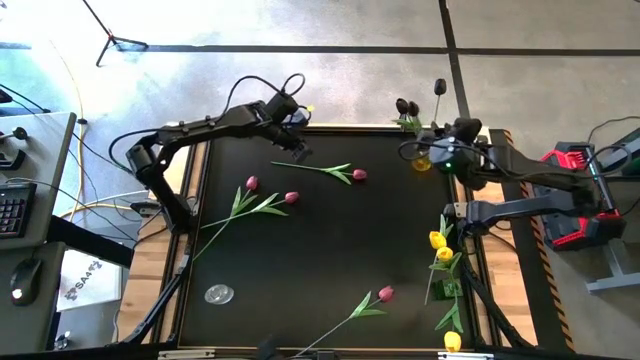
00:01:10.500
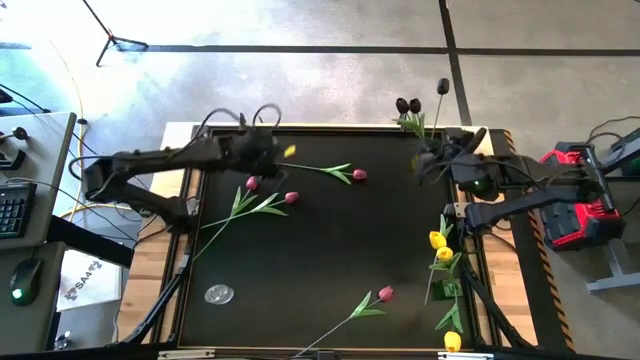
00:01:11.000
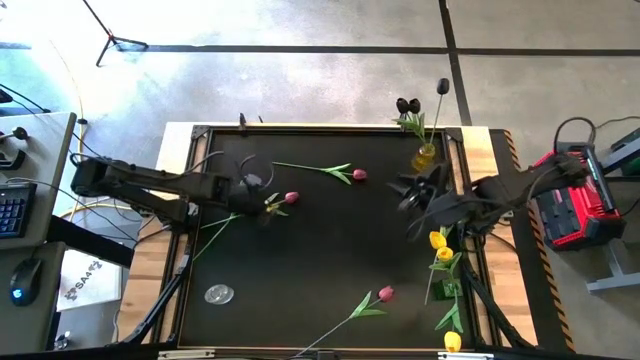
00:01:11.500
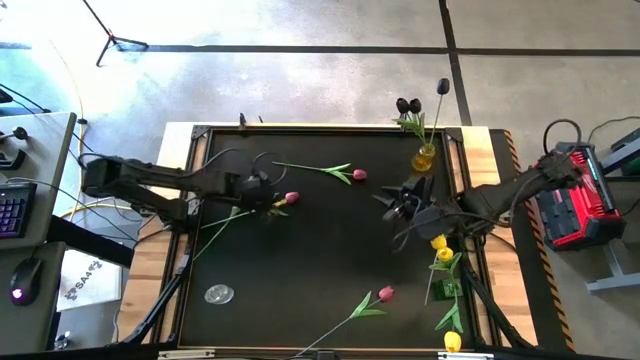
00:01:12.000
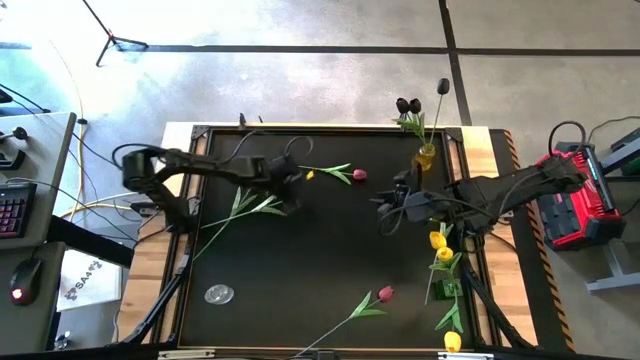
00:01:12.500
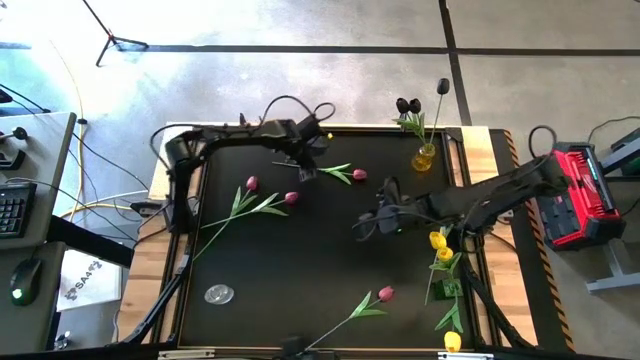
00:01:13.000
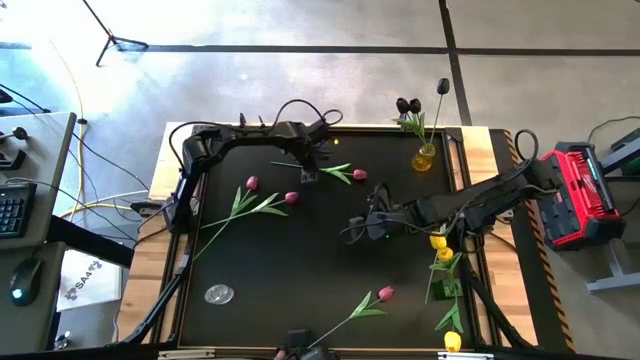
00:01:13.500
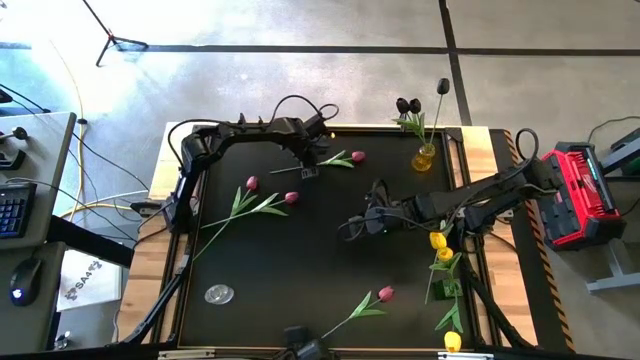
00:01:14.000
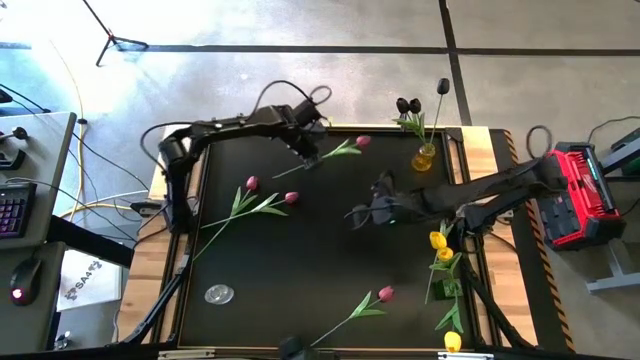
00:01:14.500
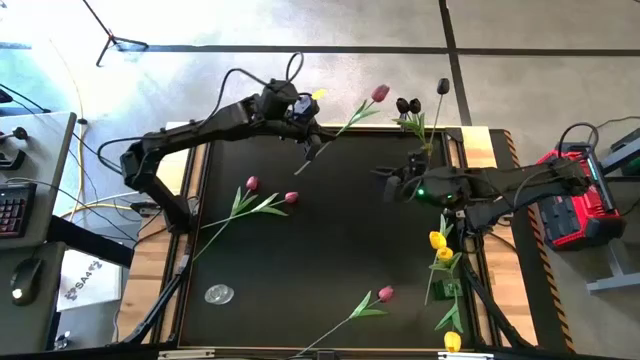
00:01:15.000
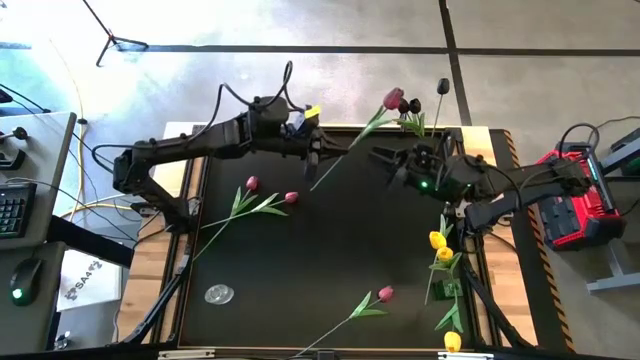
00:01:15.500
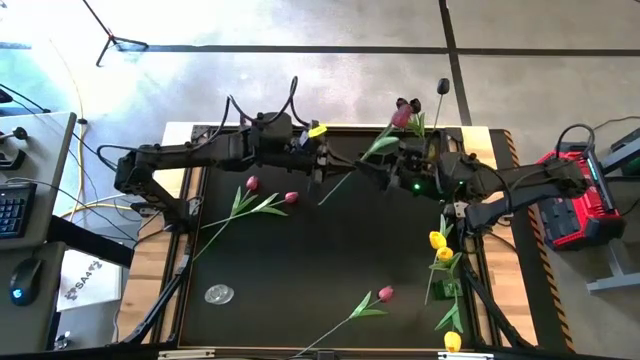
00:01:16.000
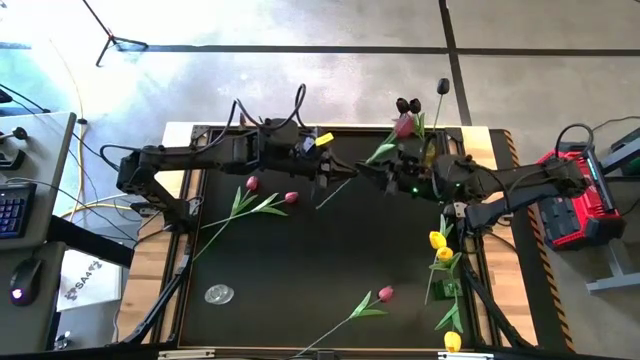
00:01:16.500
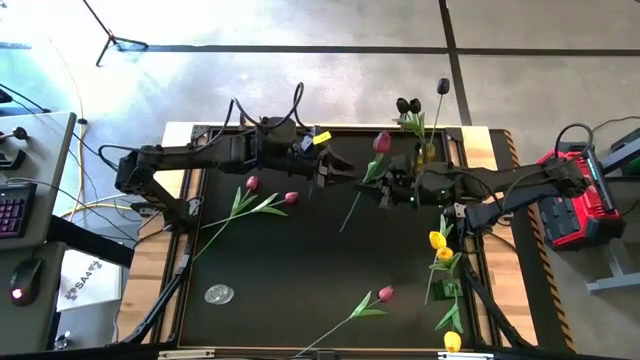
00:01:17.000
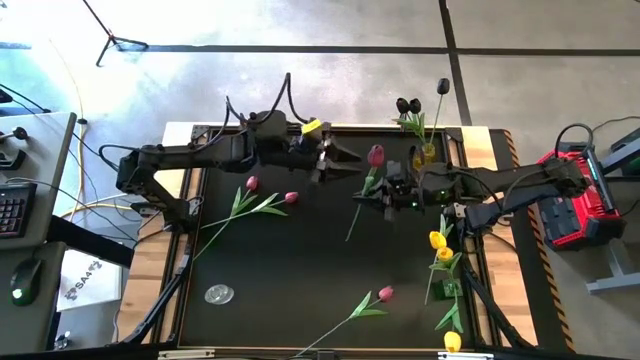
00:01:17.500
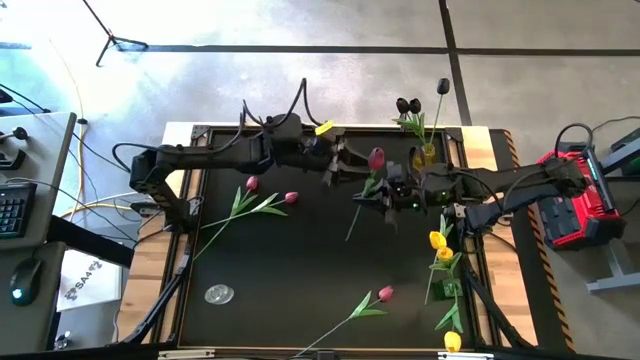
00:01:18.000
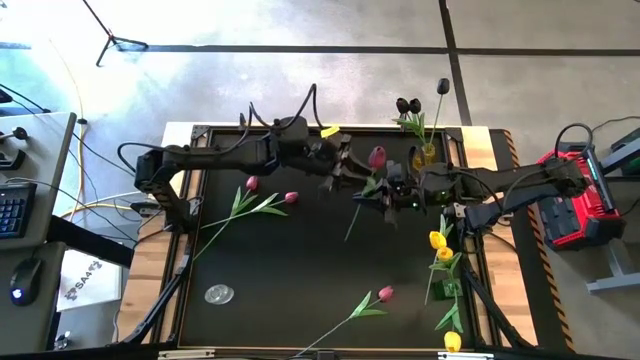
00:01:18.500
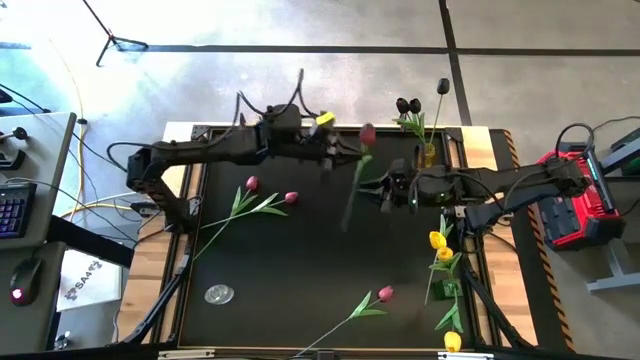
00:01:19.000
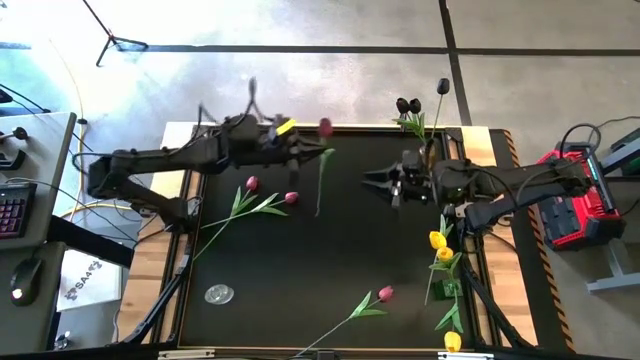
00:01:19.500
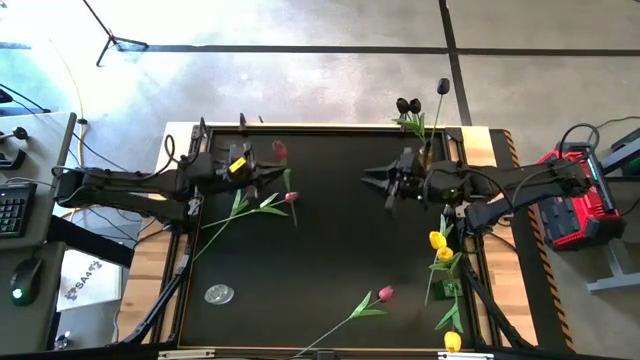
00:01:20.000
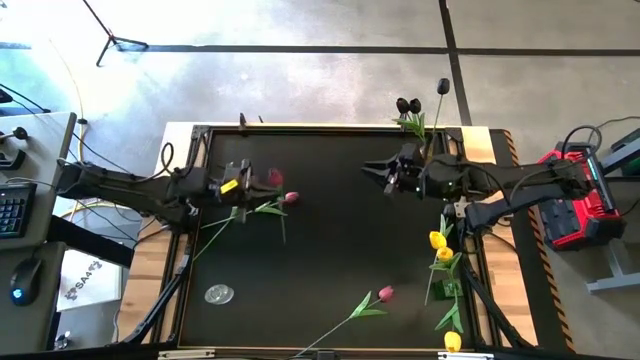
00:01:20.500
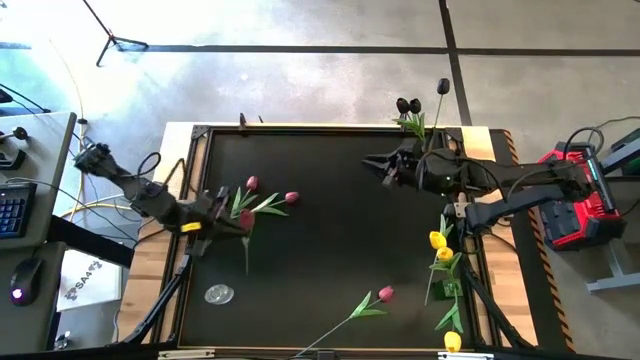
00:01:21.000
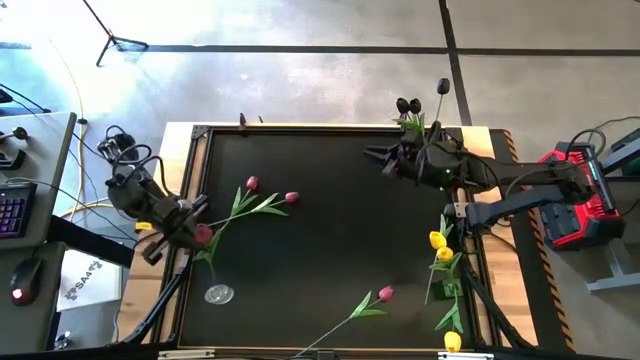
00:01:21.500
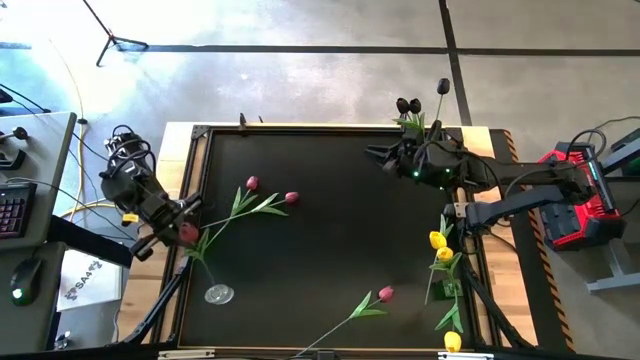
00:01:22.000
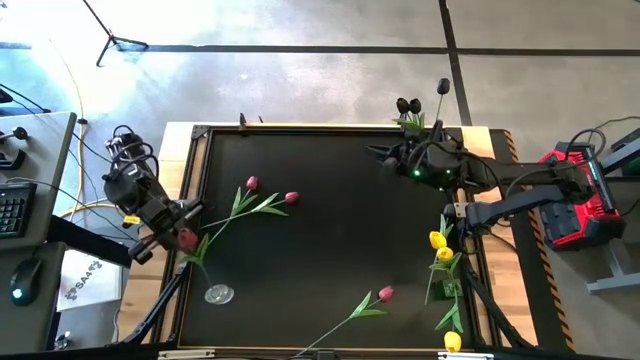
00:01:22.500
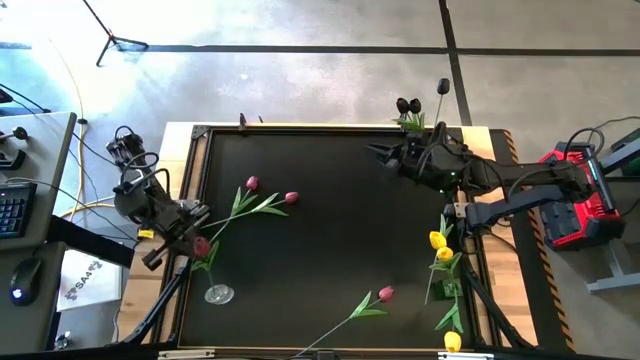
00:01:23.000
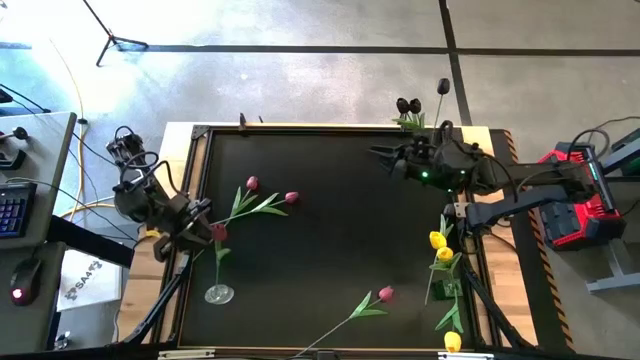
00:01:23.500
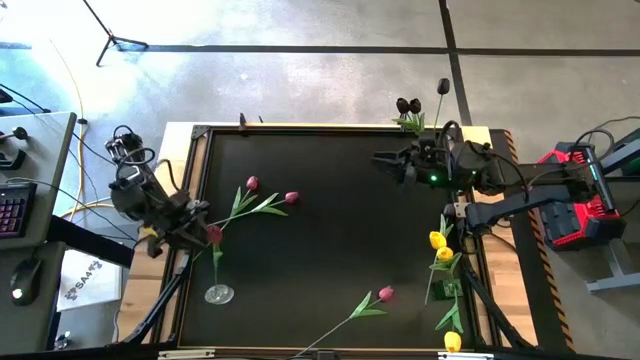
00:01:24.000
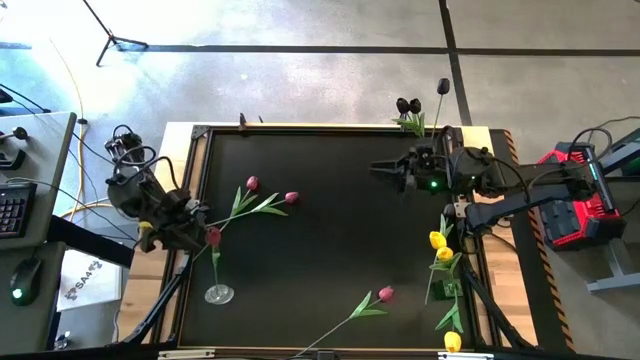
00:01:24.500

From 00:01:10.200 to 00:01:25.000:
Task: Sort flowers into vase by color
Put the top center red flower into the transparent vase

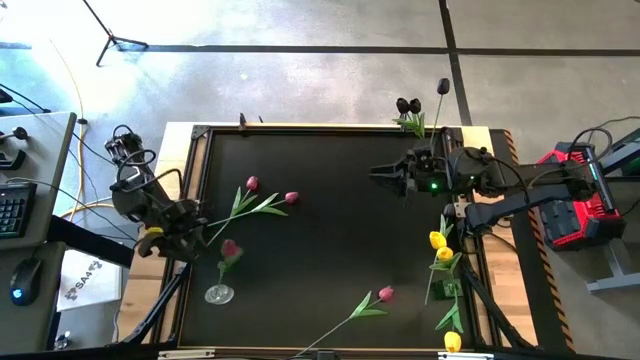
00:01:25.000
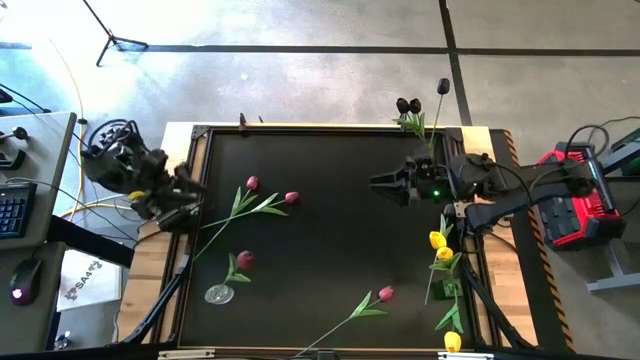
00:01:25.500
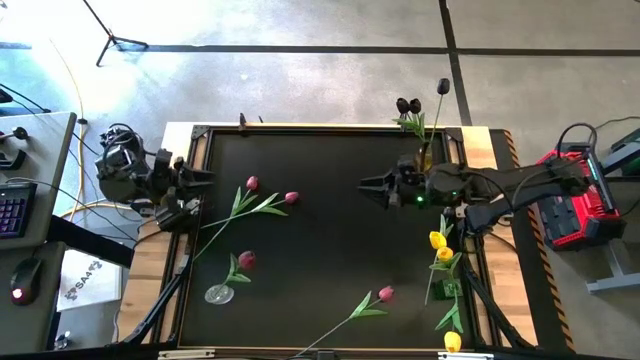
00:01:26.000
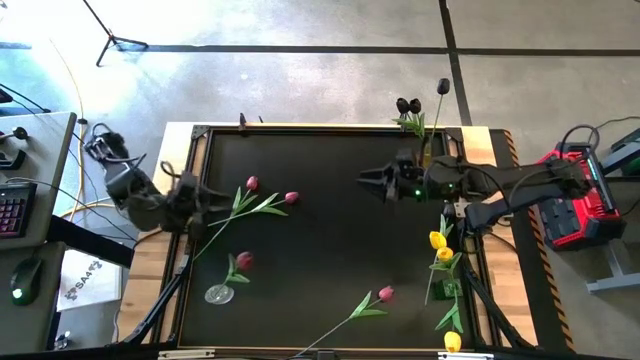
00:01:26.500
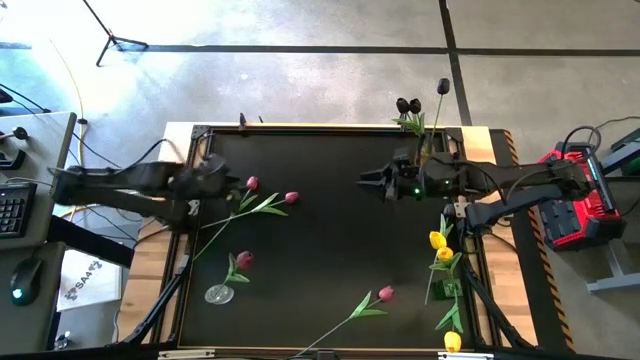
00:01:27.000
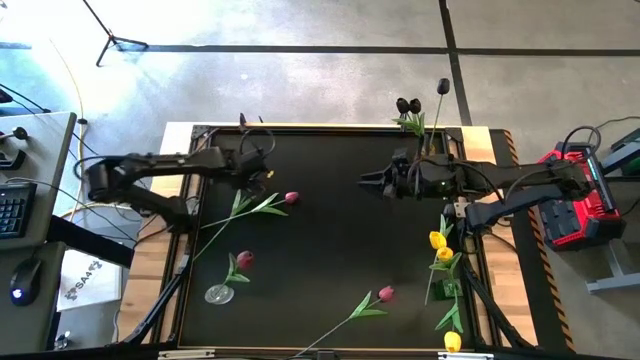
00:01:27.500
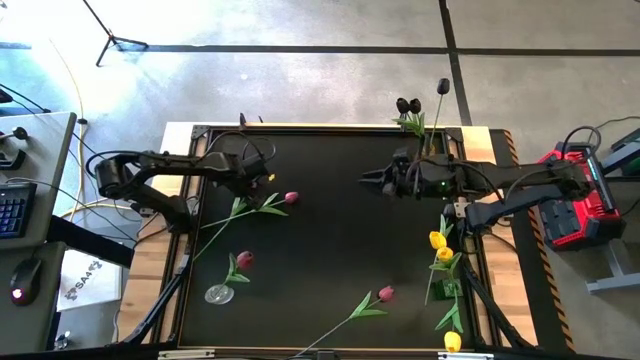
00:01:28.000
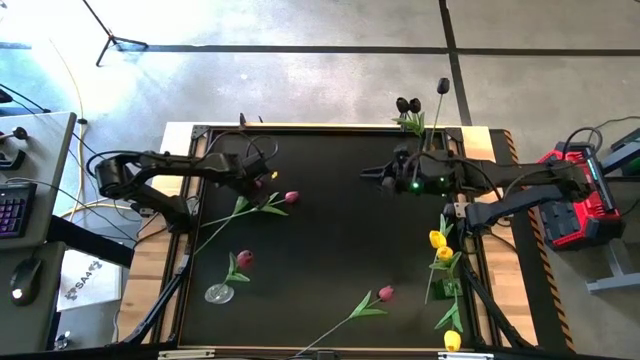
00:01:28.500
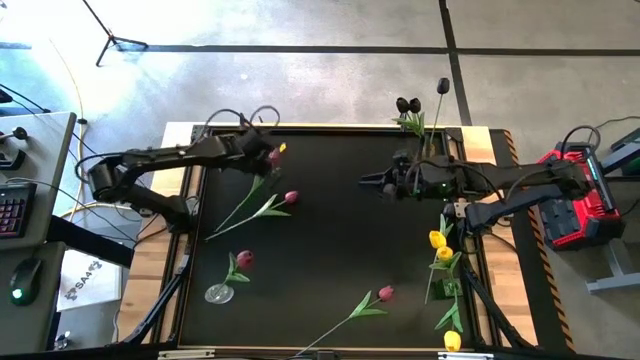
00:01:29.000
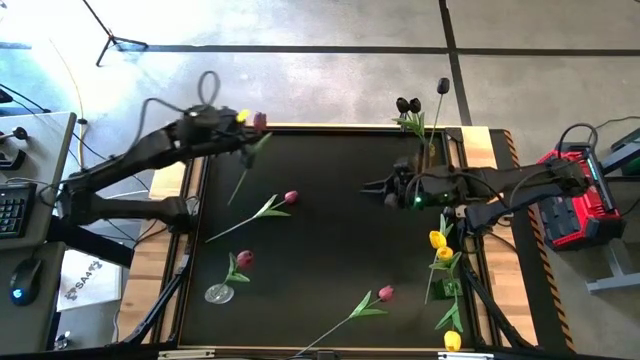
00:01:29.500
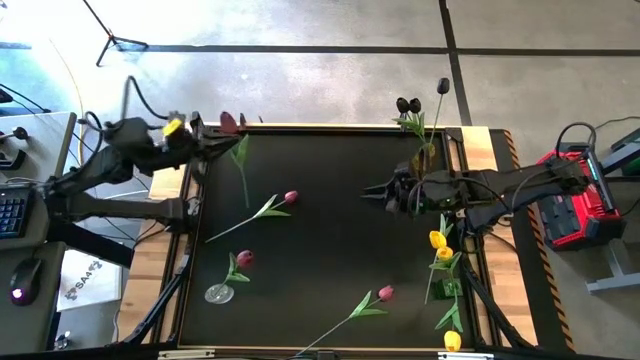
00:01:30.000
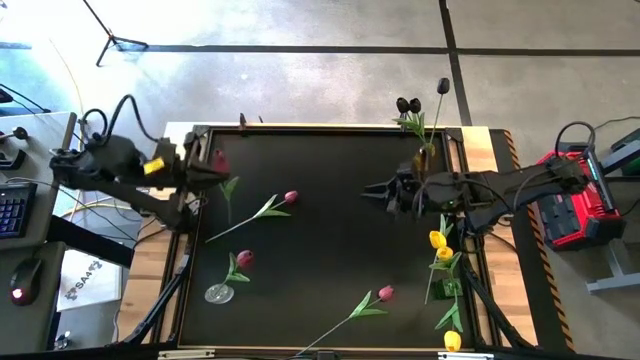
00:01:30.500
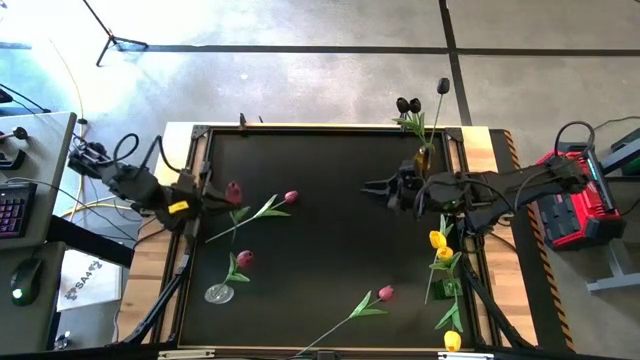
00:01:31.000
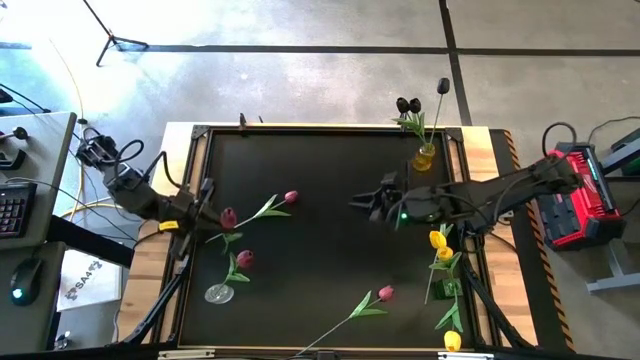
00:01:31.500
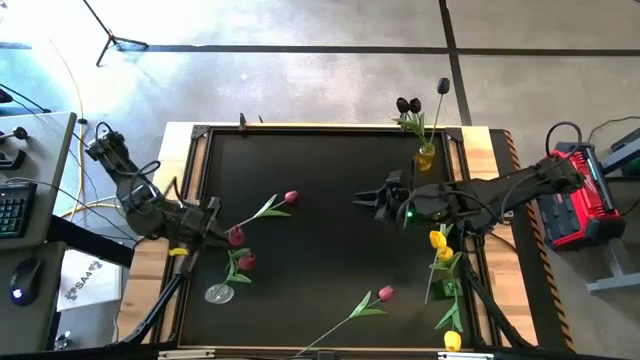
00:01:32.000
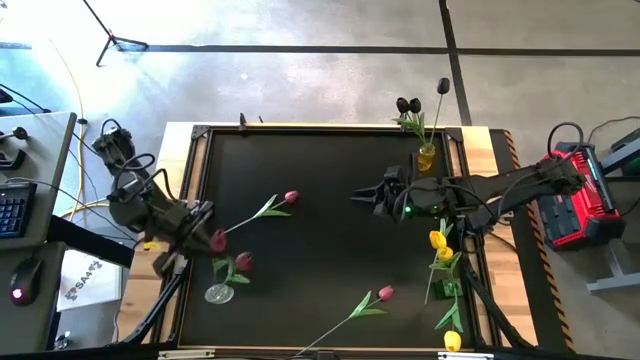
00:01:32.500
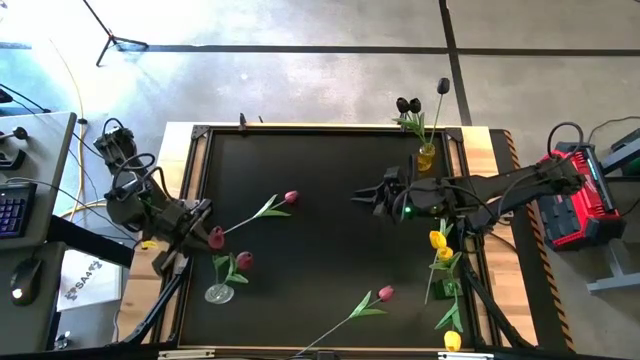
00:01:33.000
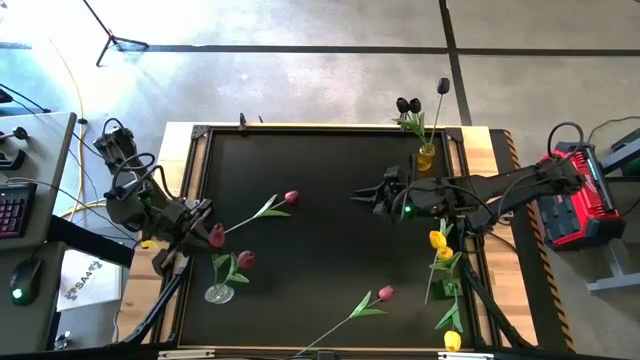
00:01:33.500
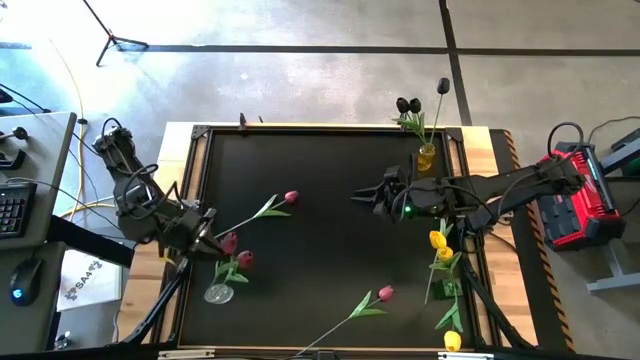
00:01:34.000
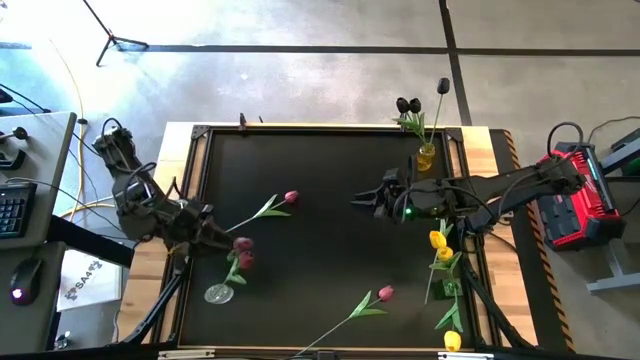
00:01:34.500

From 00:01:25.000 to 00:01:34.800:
Put the left red flower into the transparent vase
